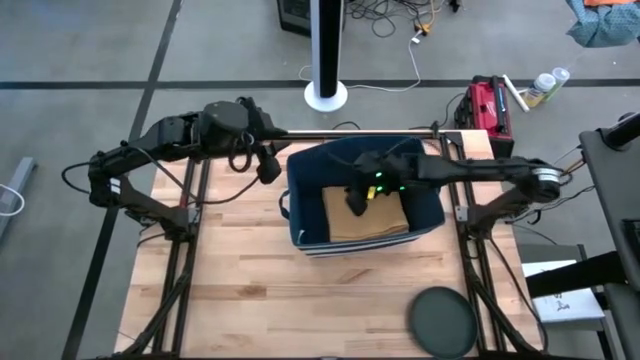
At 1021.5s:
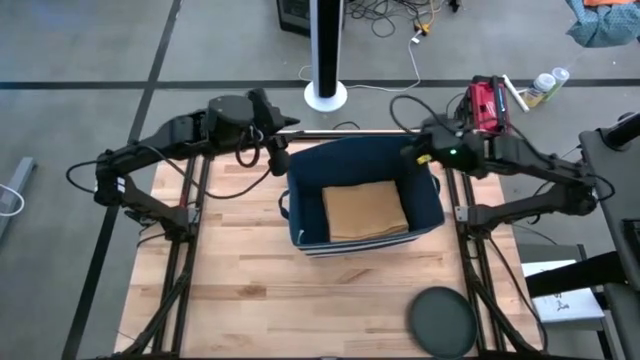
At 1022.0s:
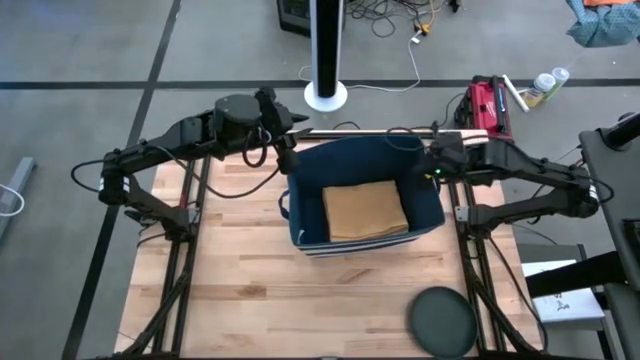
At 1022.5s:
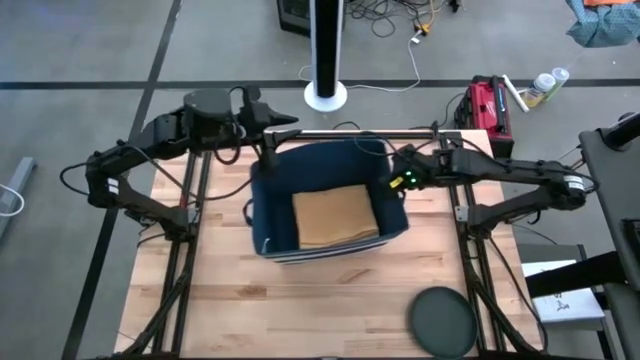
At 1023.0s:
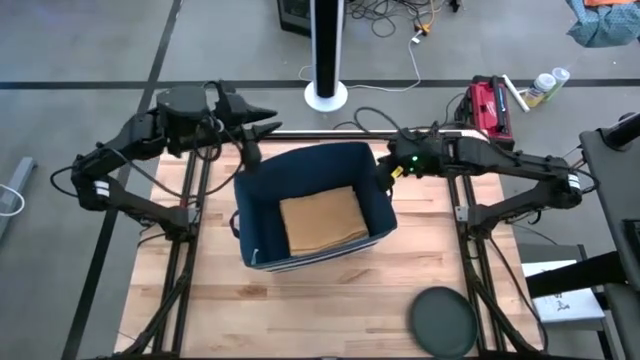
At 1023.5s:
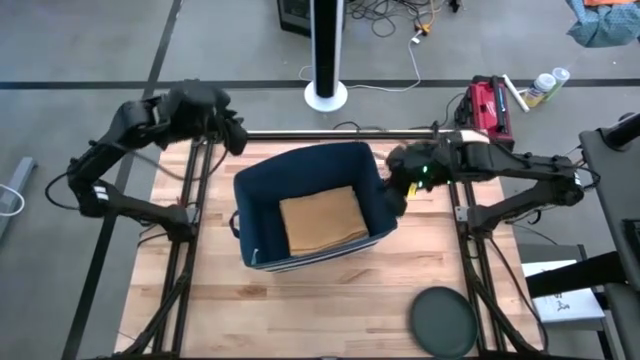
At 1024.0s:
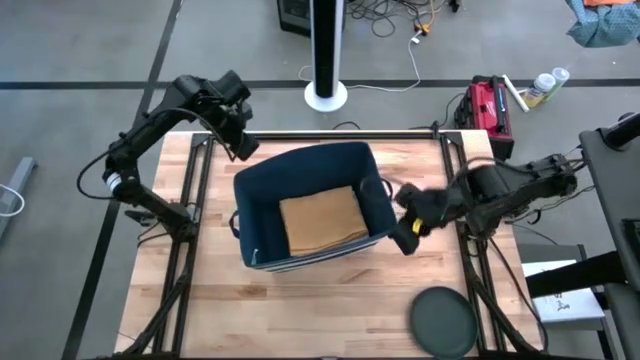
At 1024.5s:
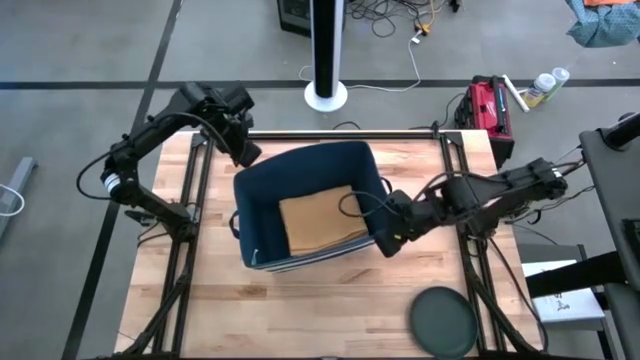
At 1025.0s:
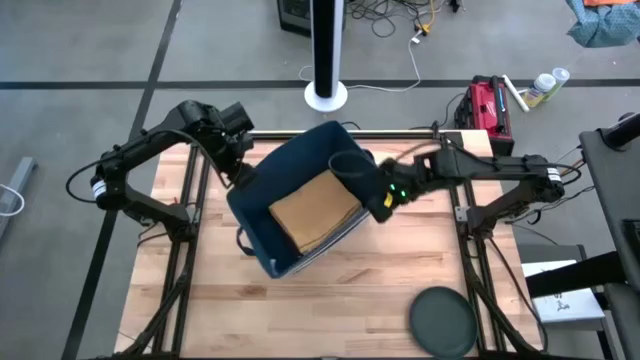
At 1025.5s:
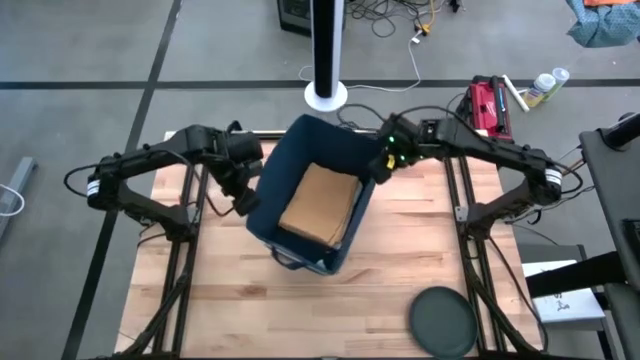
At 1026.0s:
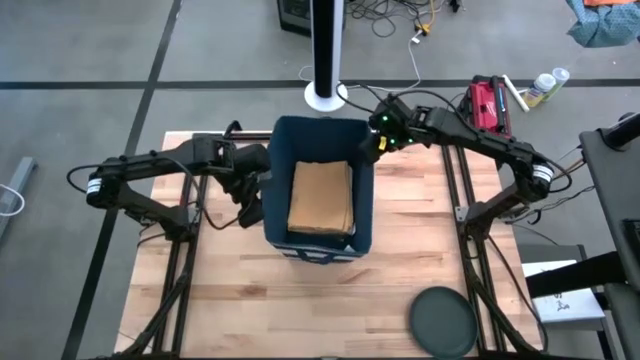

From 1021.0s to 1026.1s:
Task: Fold kitchen towel into neat rectangle
Adjust the blue laundry bin

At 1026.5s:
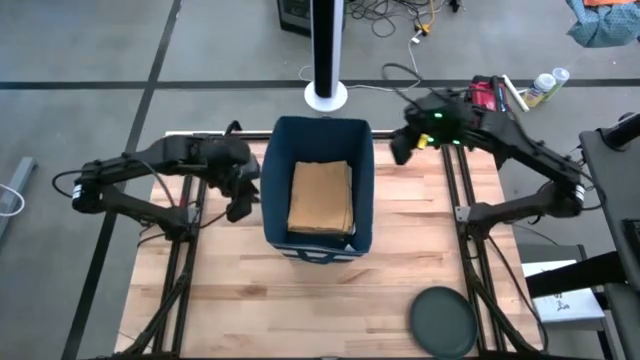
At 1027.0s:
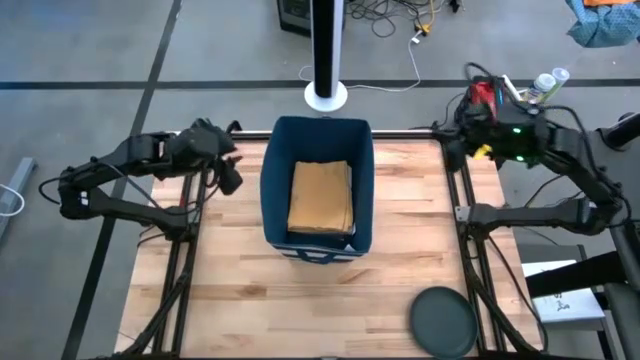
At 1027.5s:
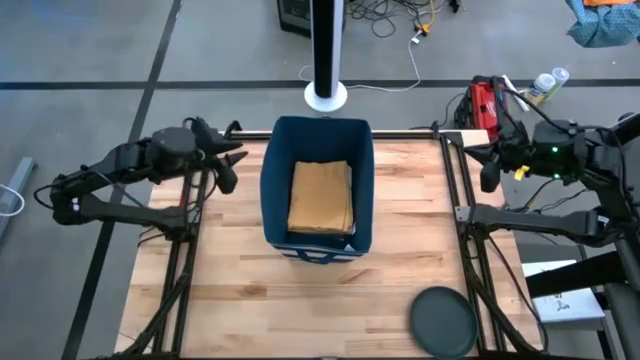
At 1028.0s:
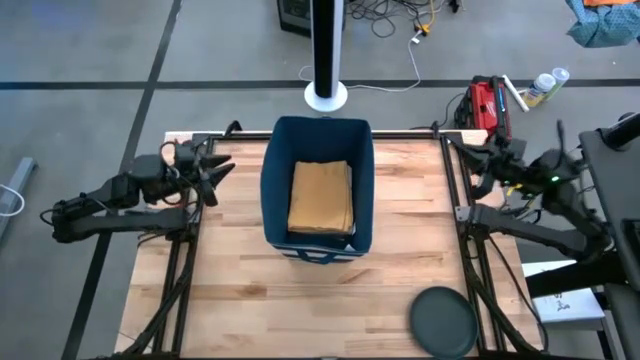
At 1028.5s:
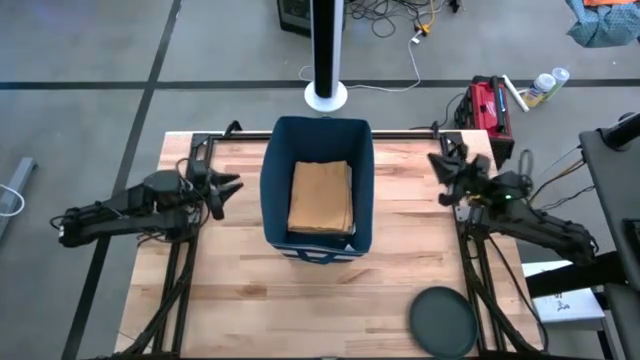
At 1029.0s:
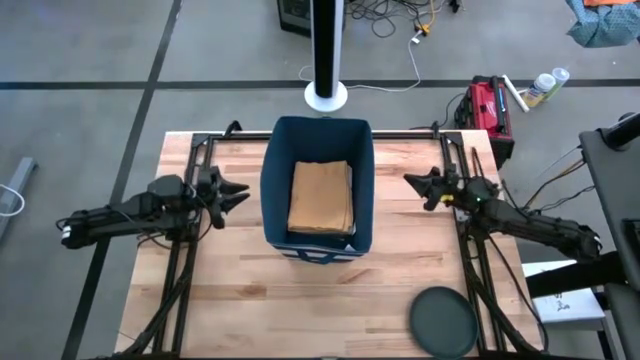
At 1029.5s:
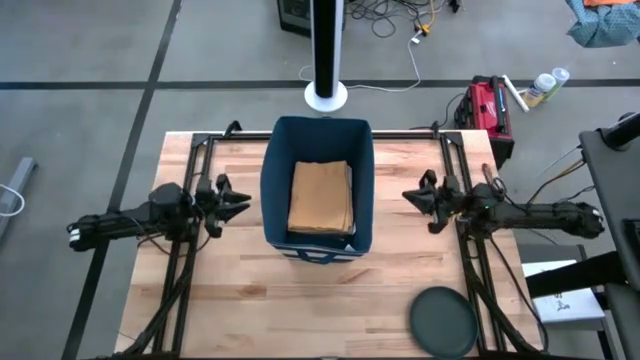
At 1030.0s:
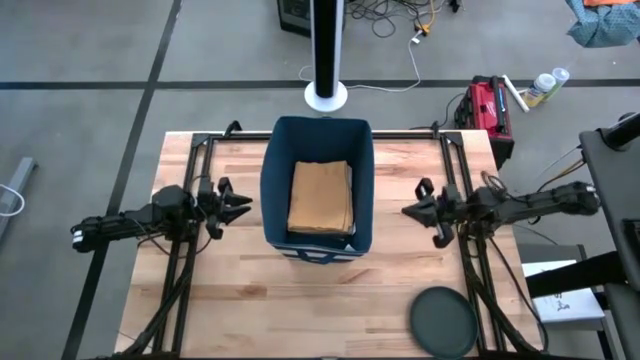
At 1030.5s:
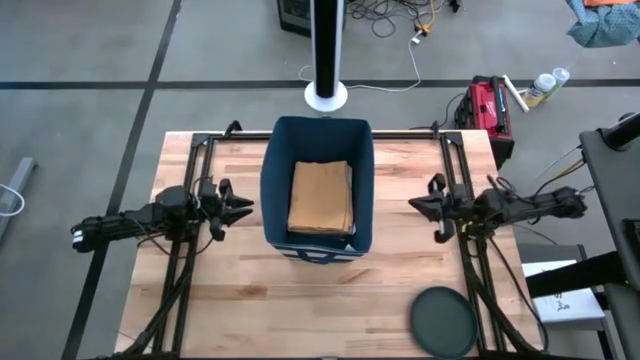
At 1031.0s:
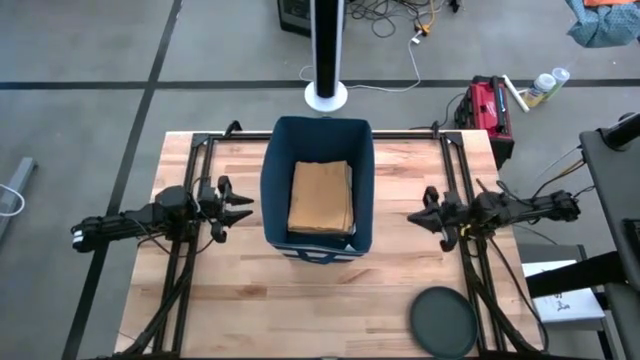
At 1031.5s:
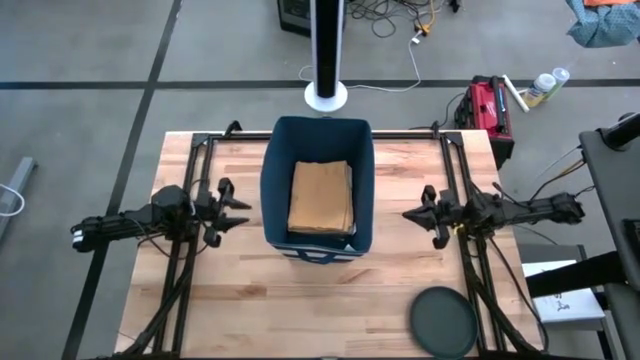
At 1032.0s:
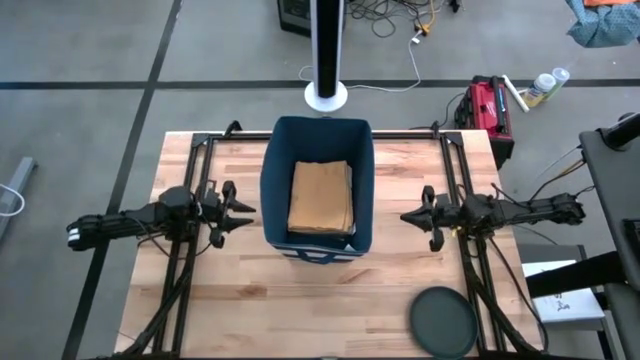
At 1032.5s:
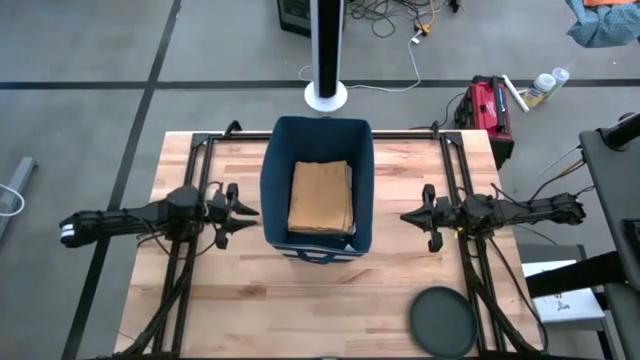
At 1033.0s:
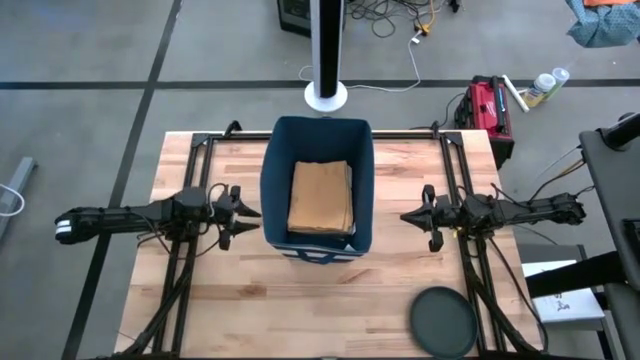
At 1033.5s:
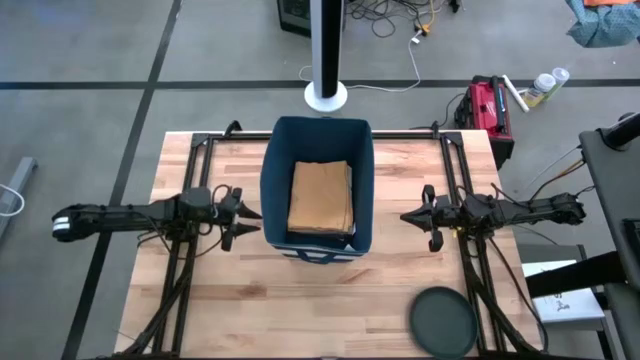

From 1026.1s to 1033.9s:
Return to Home Position

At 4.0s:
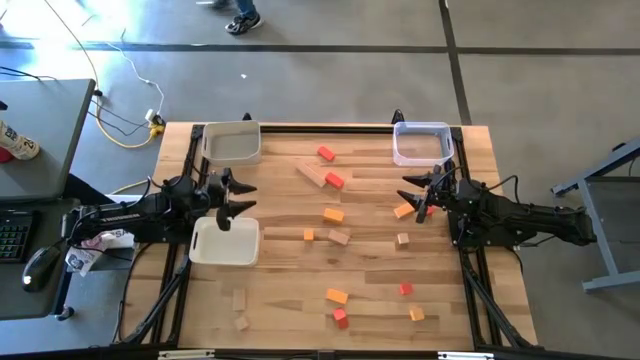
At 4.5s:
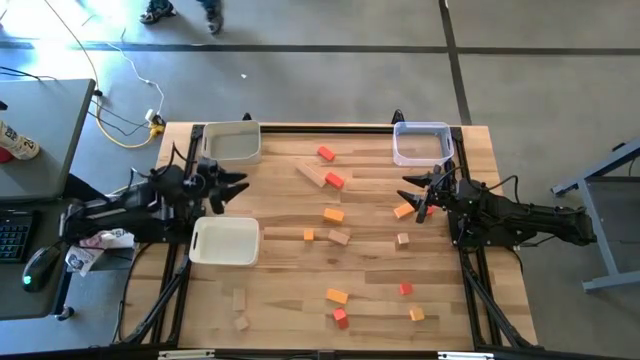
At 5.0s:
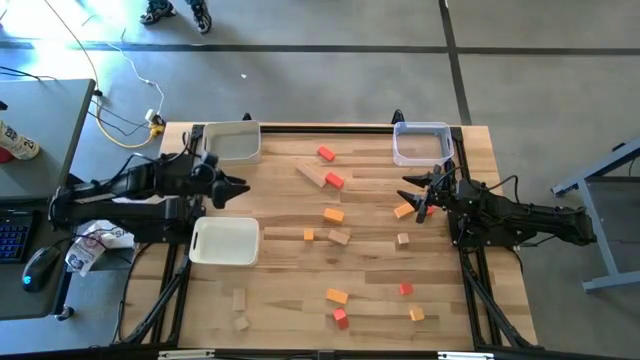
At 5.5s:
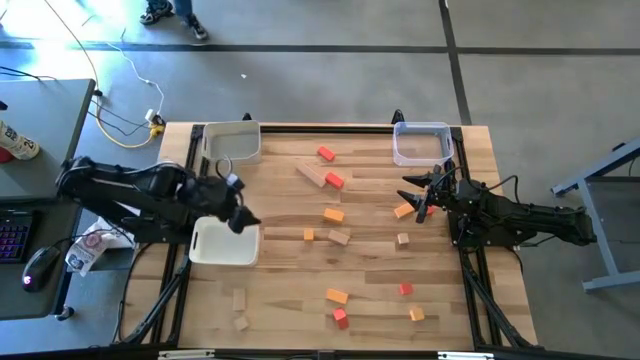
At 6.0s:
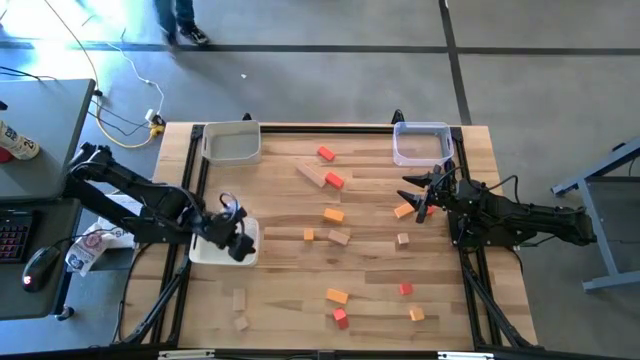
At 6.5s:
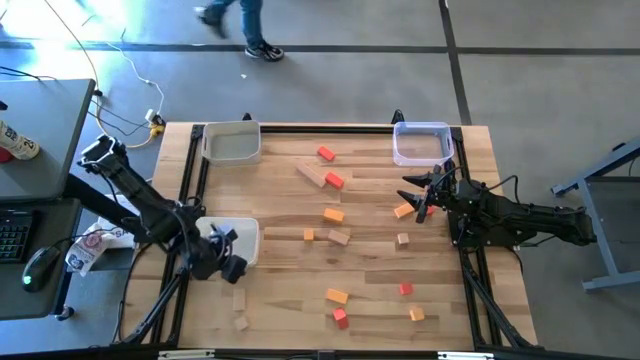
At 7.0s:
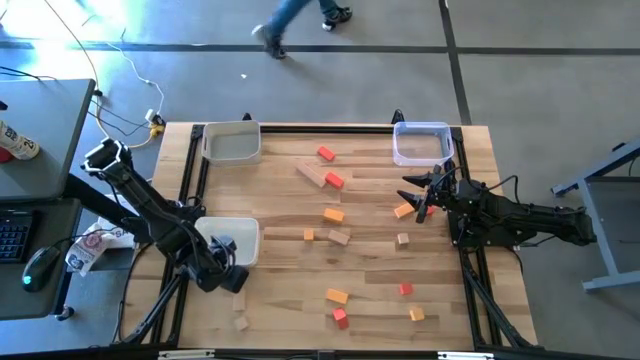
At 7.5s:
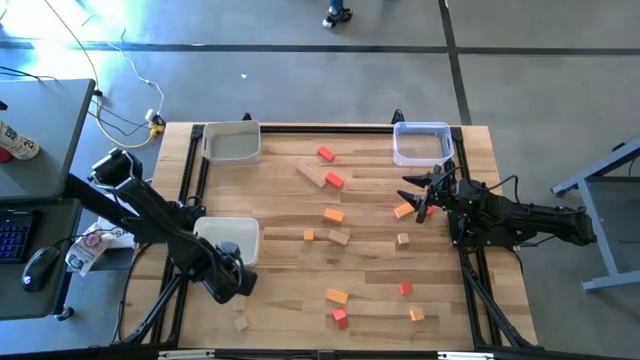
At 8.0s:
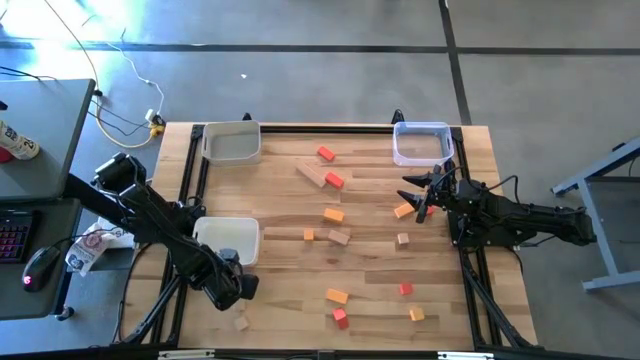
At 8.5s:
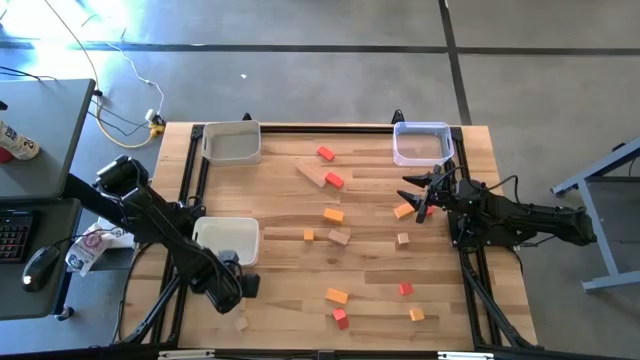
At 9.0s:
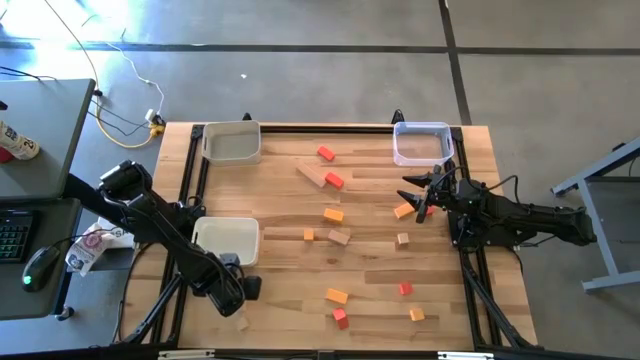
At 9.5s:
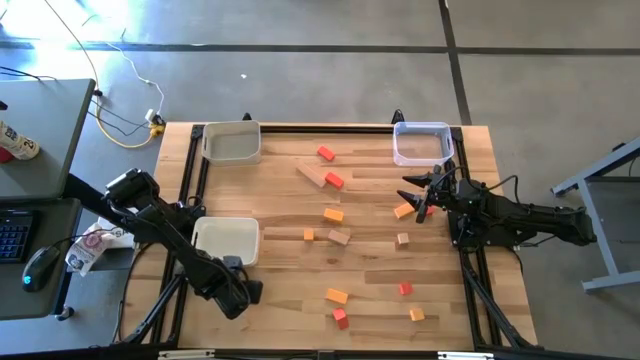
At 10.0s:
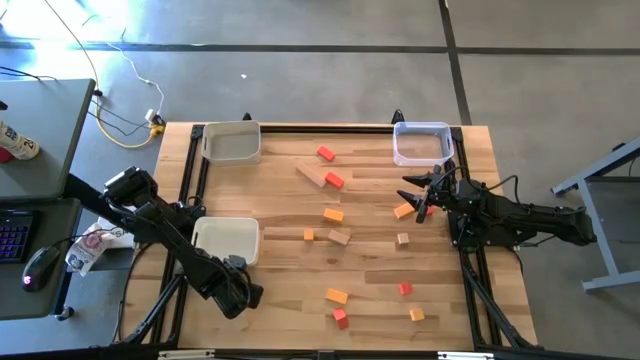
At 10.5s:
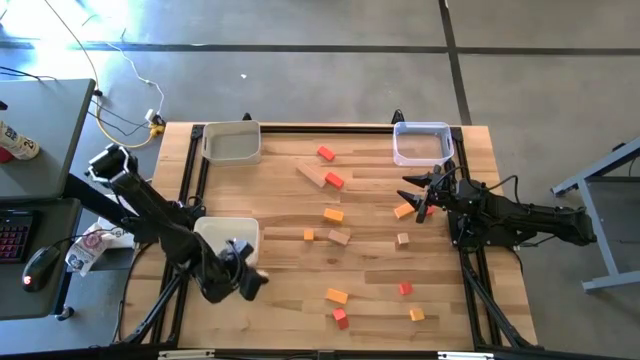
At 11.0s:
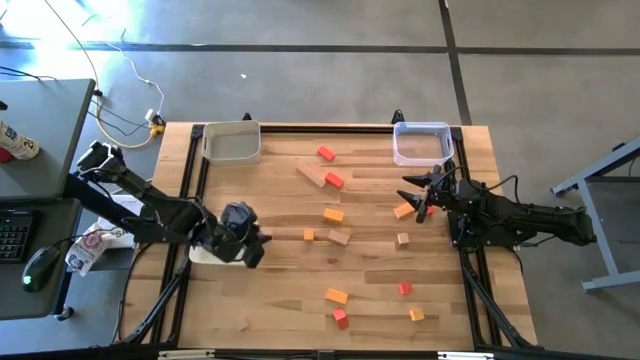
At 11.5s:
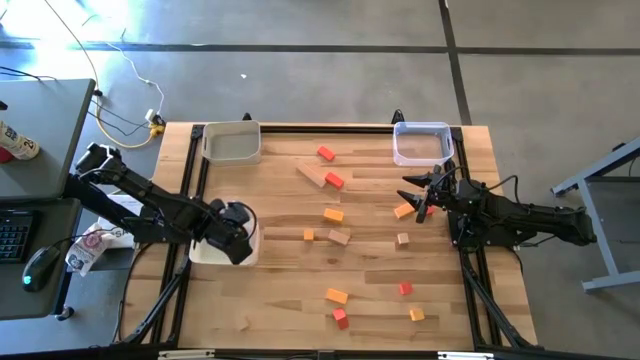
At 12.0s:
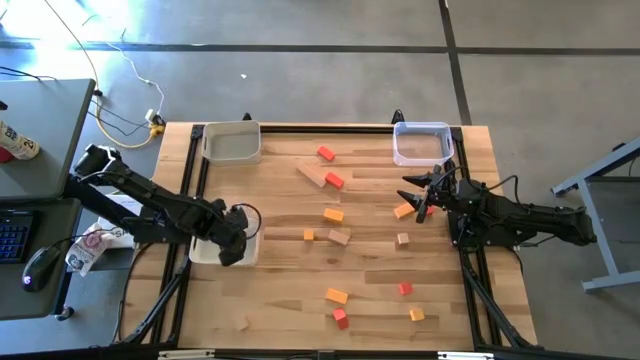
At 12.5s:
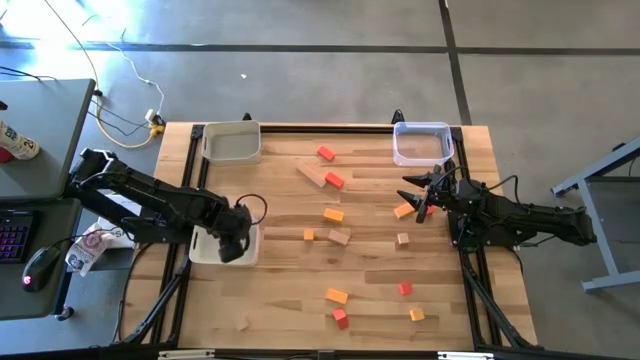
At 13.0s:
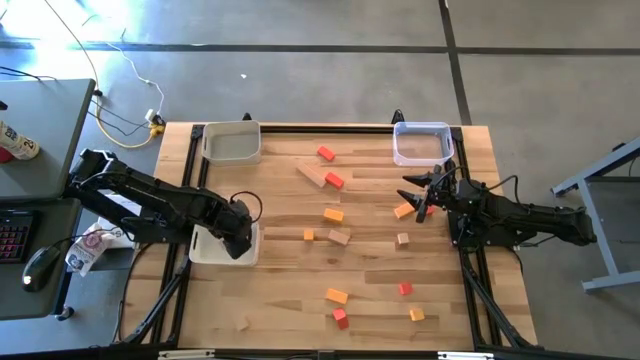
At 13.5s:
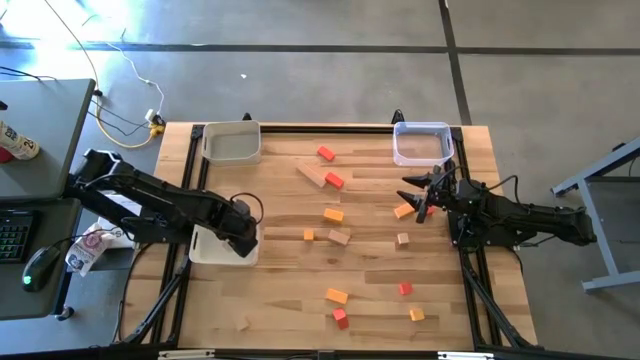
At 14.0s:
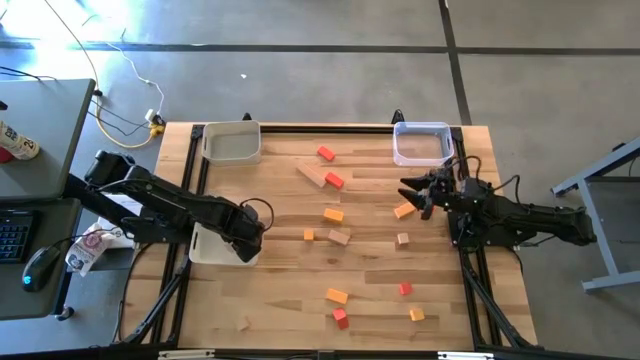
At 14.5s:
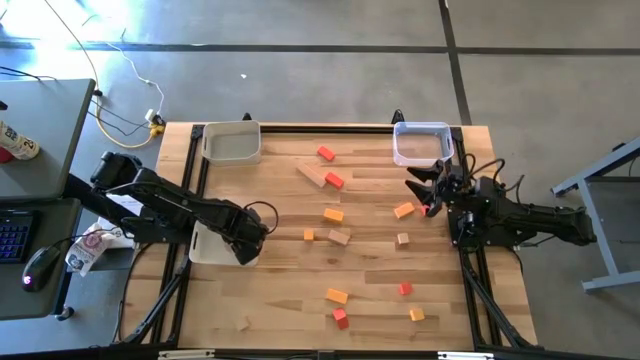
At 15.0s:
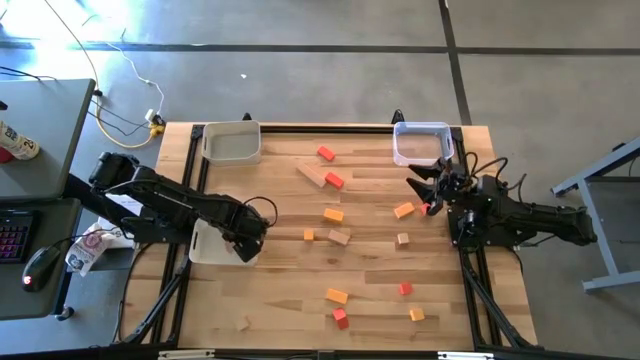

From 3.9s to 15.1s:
Task: Sort & place blocks by color
Put the brown block into the white bin
